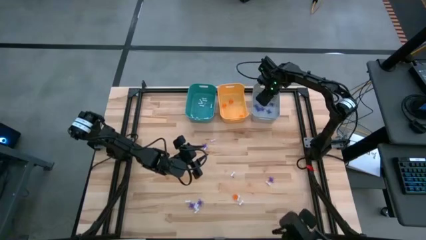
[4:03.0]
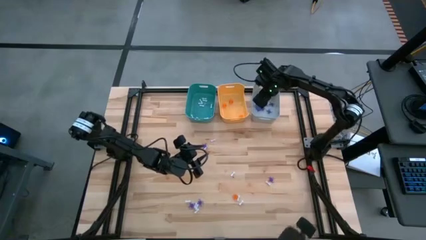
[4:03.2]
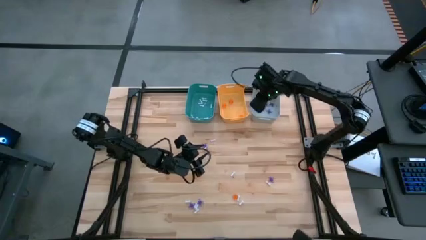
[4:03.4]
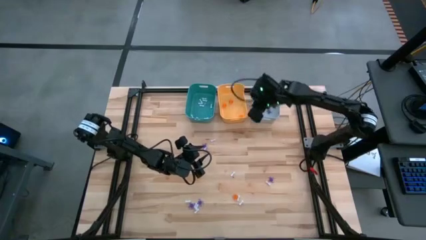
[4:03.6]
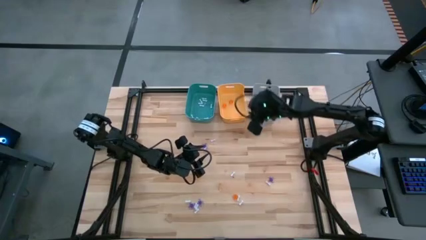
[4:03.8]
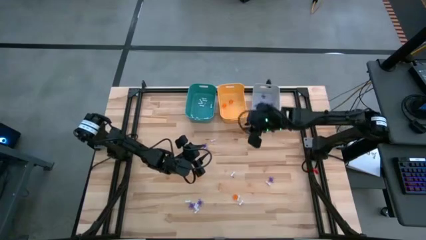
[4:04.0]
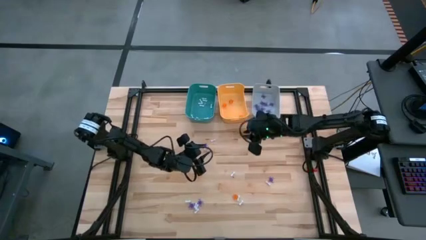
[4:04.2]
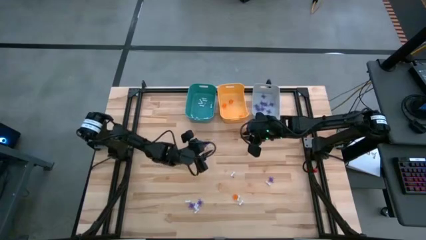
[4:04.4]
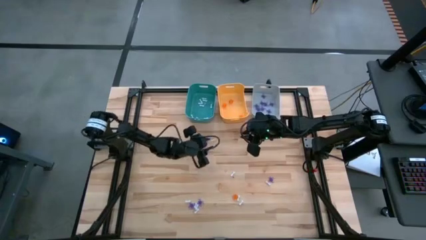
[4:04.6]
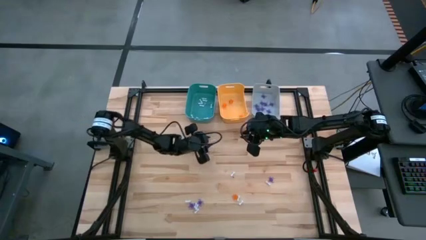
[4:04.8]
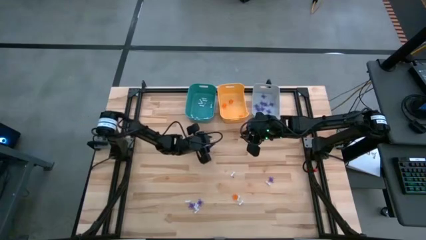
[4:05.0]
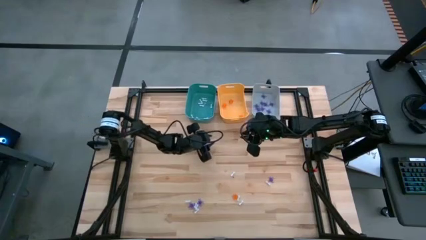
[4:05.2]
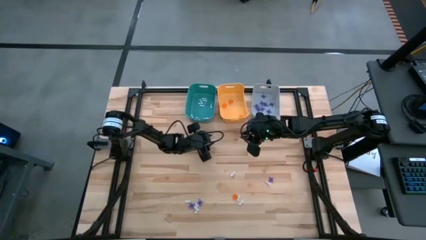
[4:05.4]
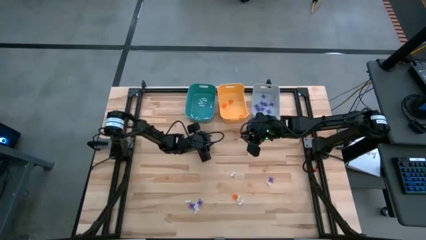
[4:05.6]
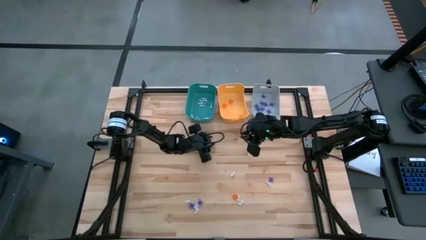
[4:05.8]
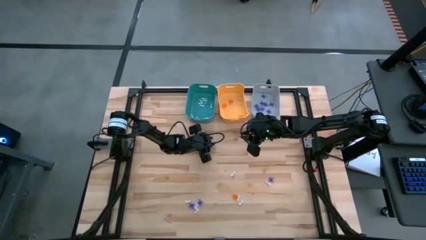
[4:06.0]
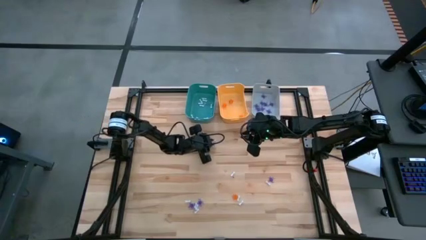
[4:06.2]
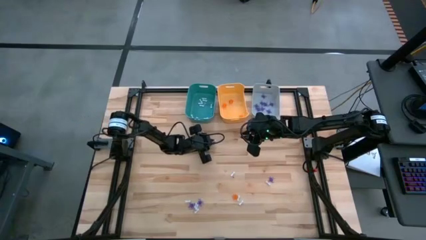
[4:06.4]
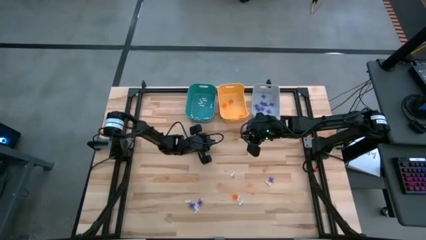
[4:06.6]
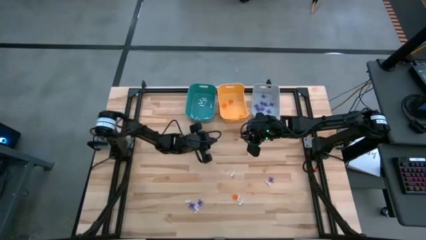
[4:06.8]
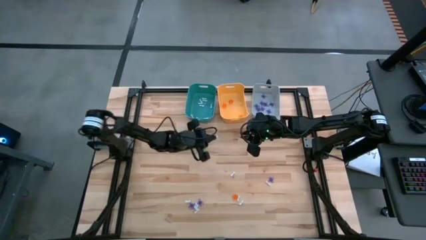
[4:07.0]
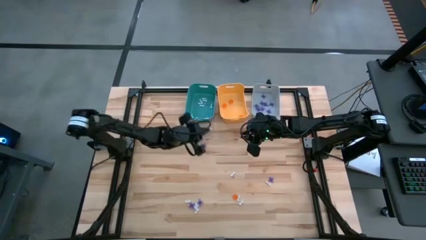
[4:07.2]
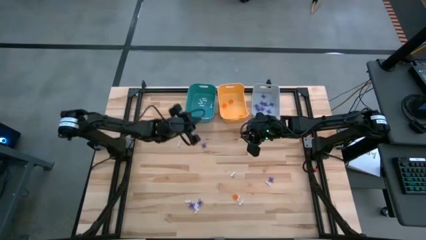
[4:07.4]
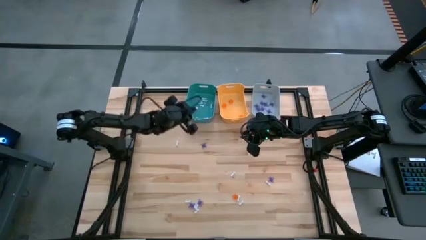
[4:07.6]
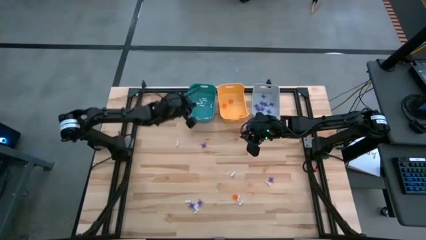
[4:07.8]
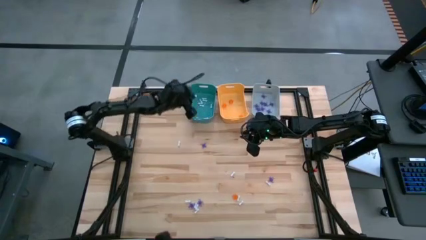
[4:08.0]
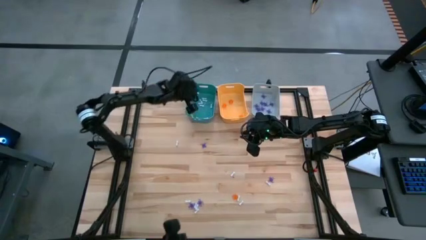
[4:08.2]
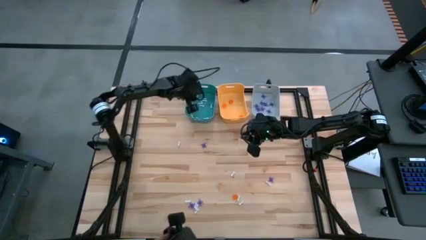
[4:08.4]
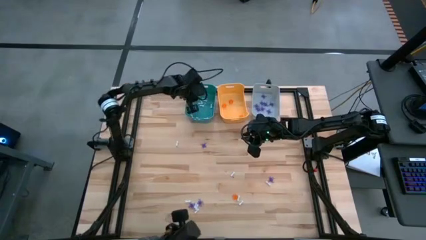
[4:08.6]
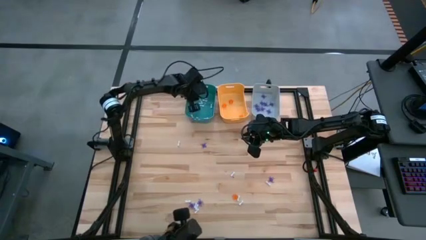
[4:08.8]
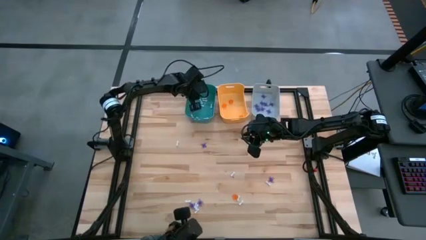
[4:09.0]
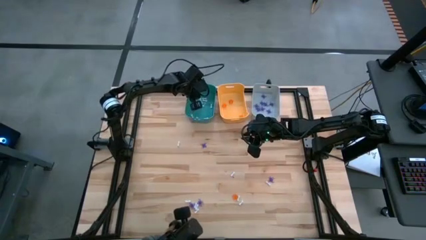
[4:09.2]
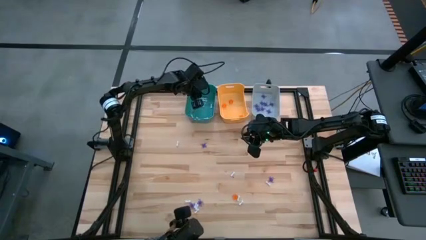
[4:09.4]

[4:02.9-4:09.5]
Task: Sort Halloween decoration
Put the white bone toy into the blue bin

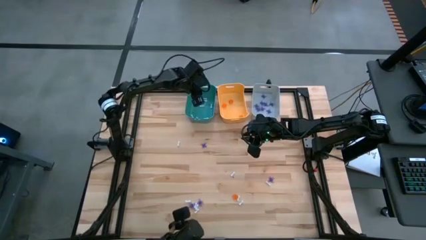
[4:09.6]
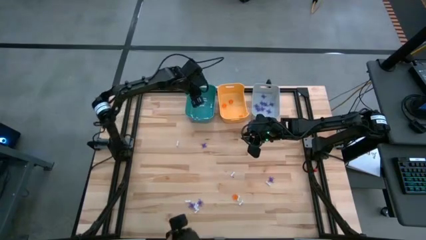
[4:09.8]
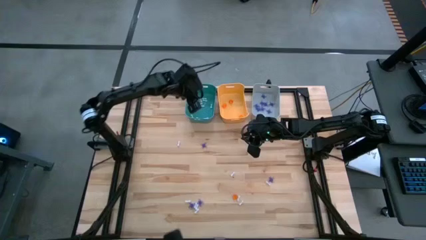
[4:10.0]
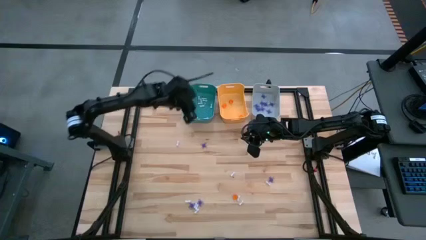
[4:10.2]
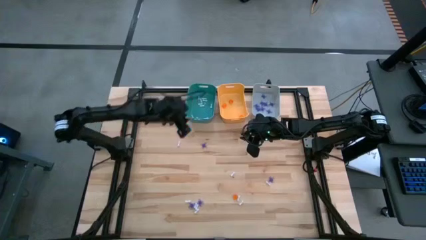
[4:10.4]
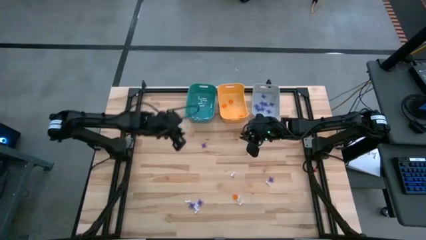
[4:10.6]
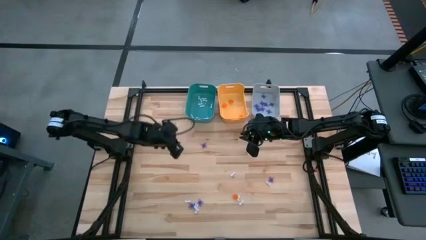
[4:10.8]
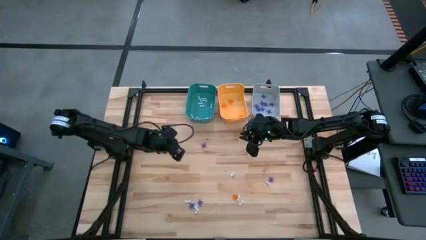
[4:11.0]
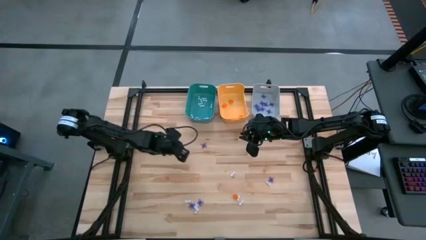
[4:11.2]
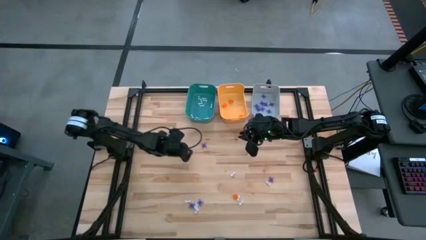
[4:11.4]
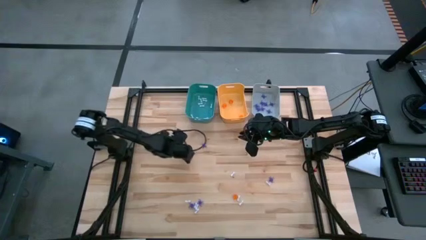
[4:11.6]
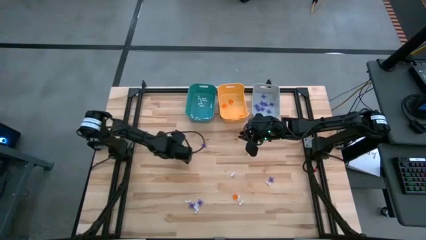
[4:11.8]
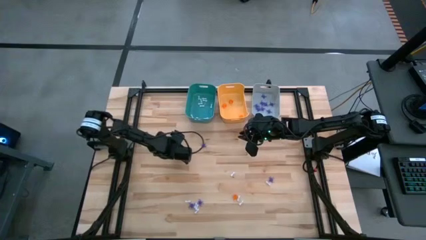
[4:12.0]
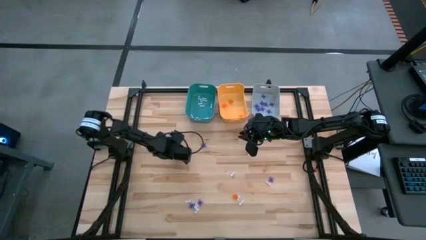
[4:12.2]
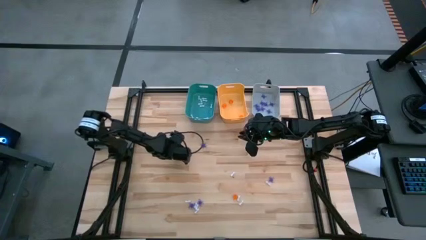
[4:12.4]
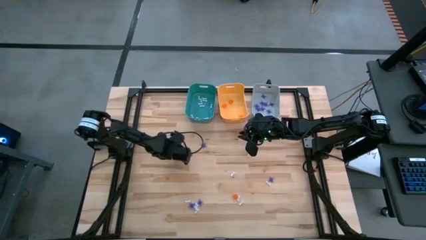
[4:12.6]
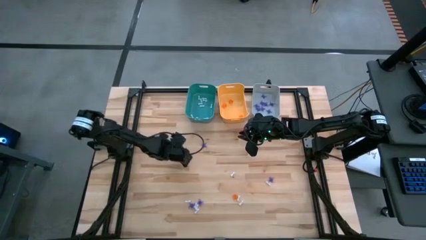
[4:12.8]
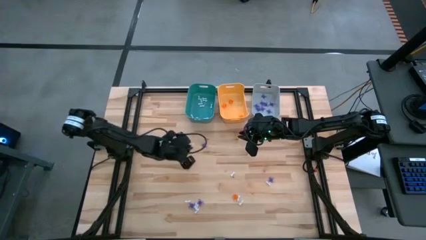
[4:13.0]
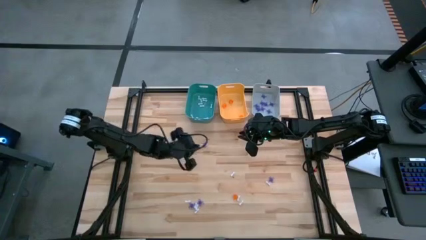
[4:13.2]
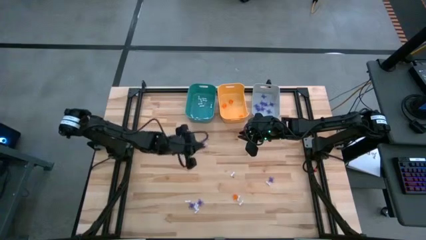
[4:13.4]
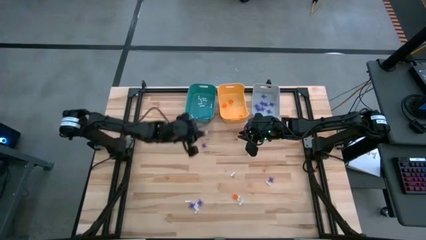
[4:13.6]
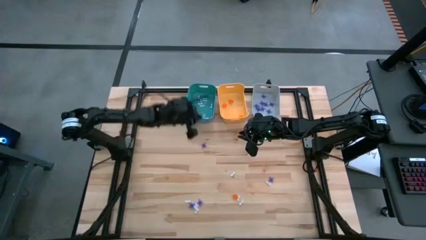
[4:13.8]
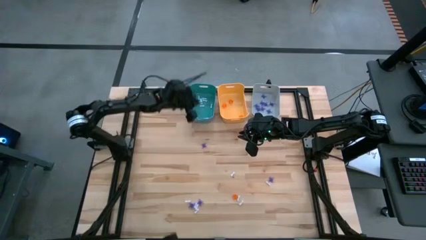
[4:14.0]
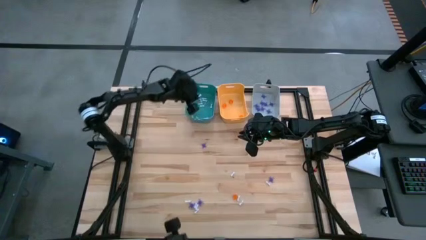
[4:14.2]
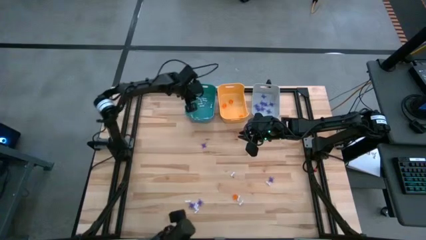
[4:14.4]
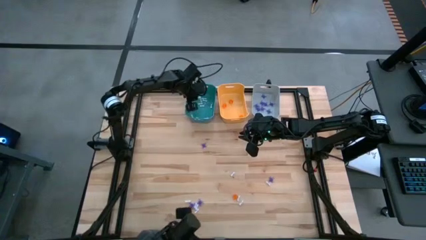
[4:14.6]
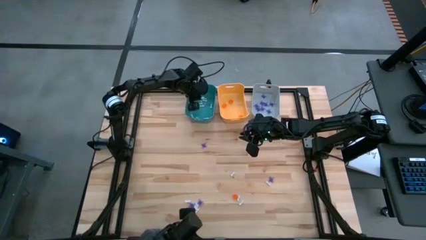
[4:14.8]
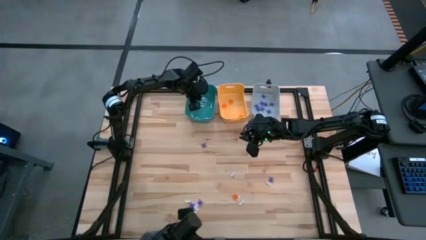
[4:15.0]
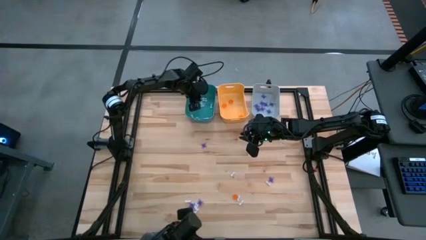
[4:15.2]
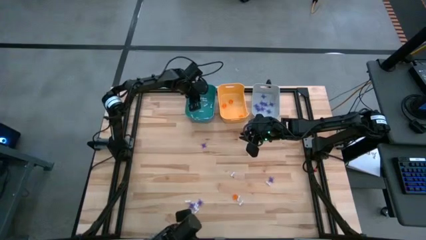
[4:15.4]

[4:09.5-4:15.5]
Put the white bone toy into the blue bin
